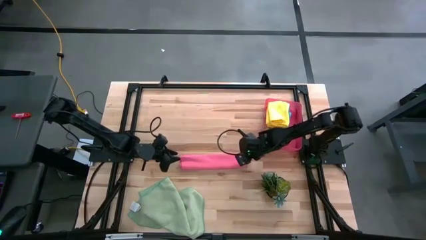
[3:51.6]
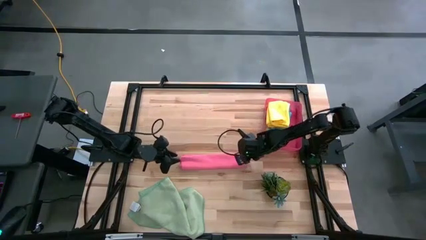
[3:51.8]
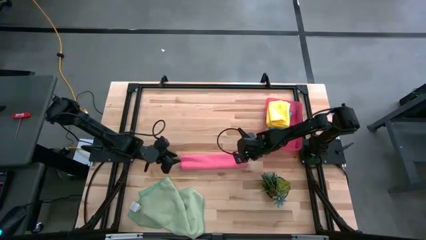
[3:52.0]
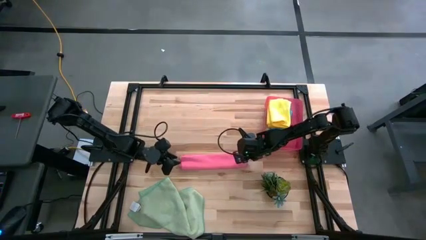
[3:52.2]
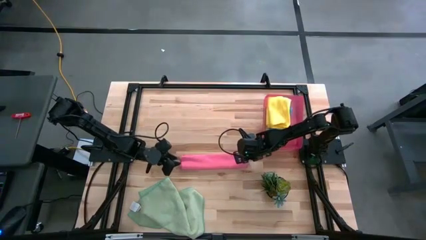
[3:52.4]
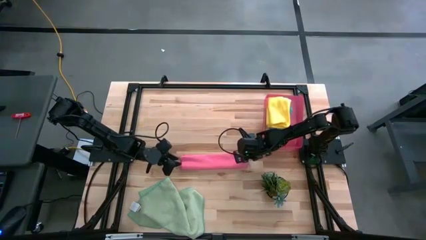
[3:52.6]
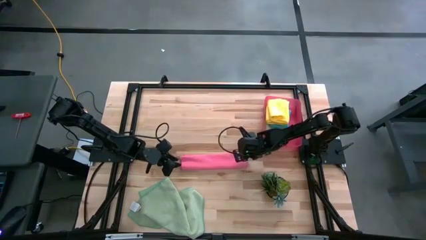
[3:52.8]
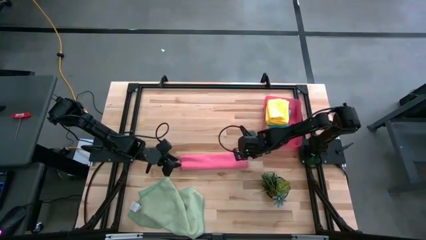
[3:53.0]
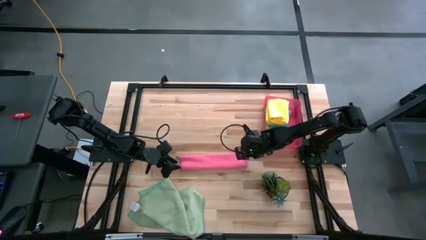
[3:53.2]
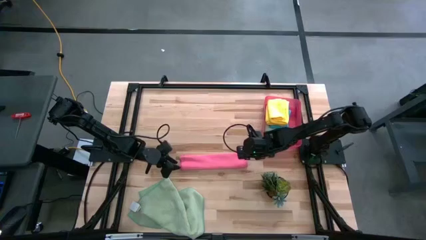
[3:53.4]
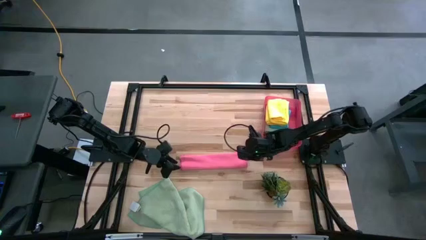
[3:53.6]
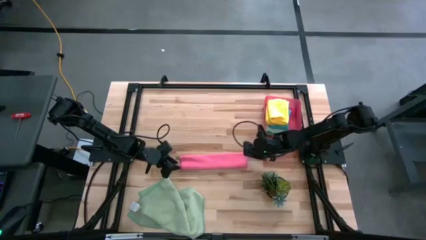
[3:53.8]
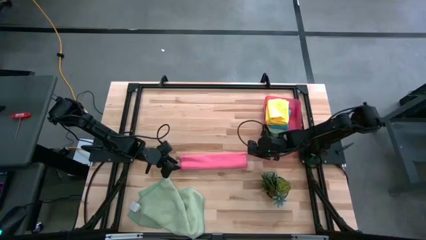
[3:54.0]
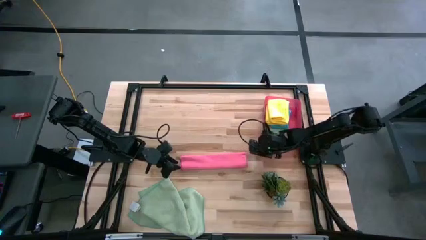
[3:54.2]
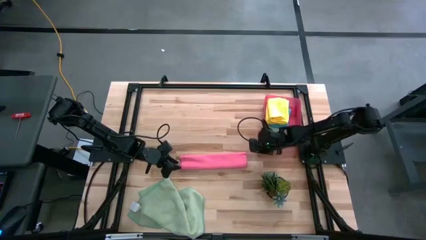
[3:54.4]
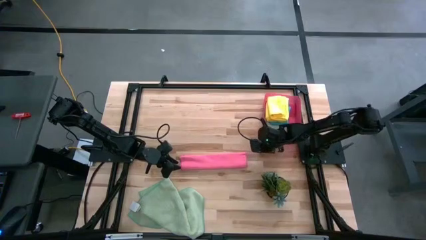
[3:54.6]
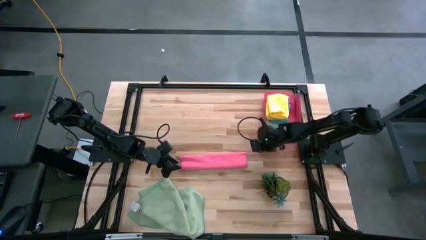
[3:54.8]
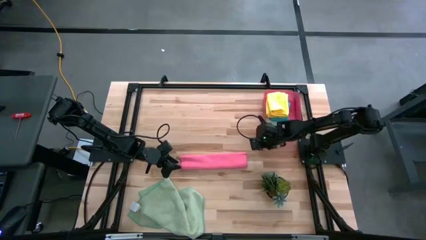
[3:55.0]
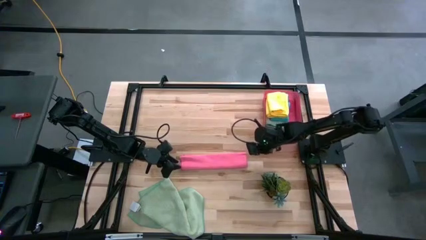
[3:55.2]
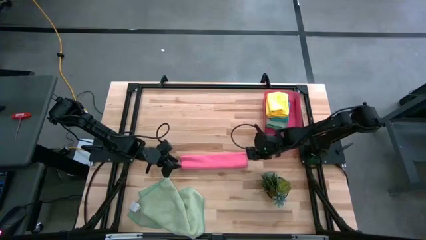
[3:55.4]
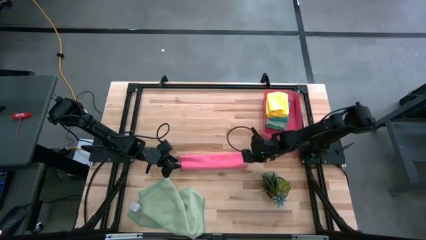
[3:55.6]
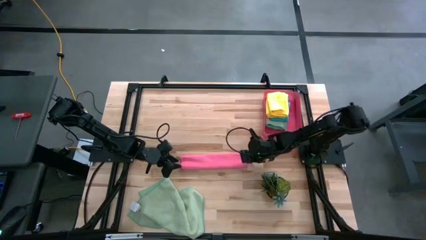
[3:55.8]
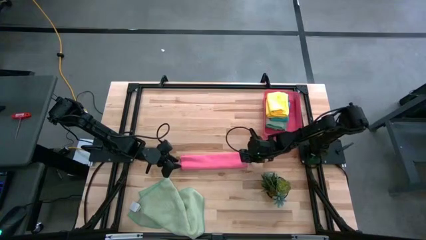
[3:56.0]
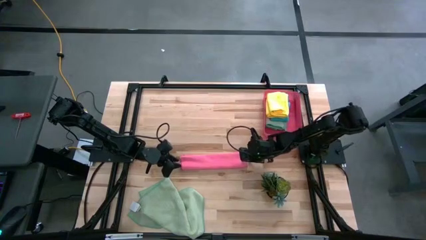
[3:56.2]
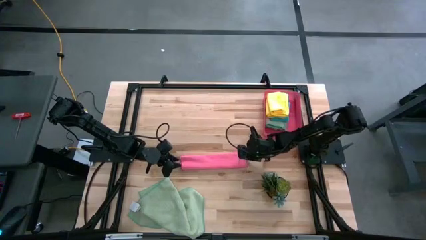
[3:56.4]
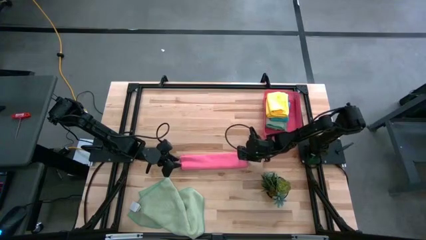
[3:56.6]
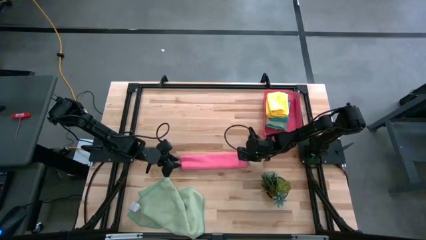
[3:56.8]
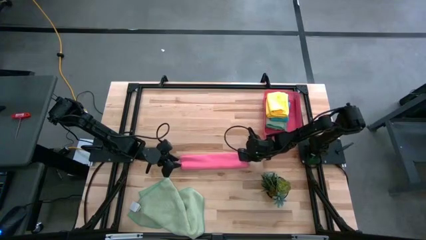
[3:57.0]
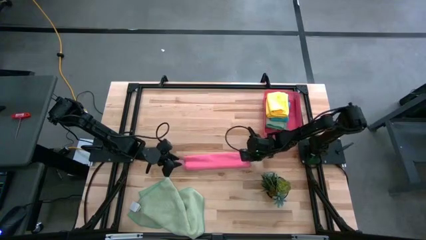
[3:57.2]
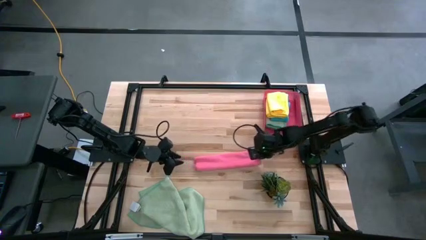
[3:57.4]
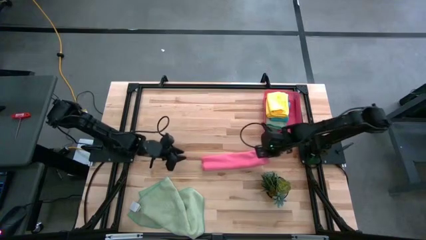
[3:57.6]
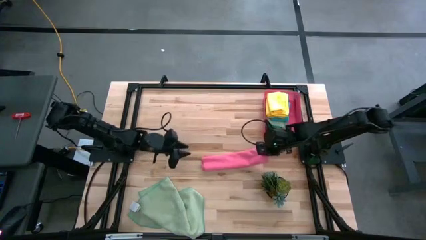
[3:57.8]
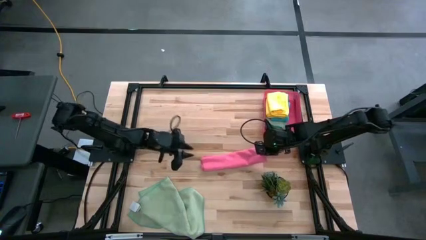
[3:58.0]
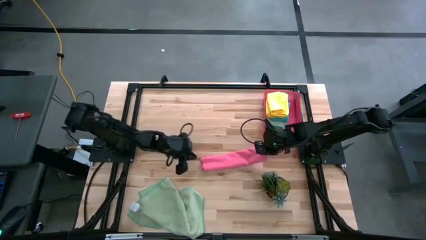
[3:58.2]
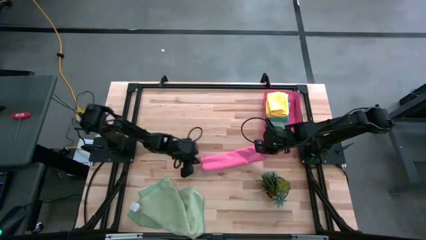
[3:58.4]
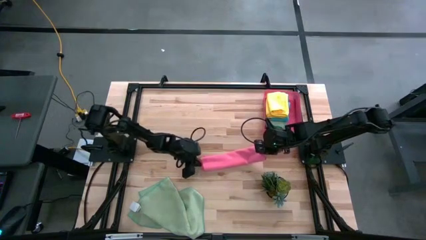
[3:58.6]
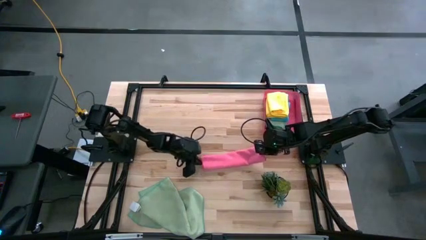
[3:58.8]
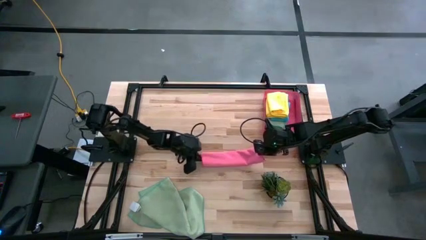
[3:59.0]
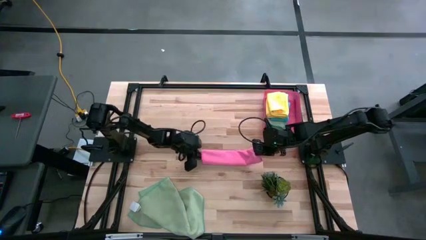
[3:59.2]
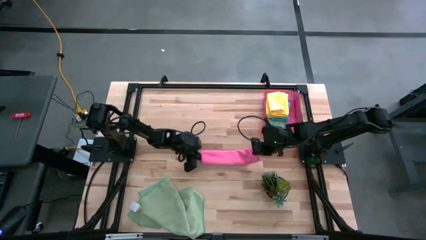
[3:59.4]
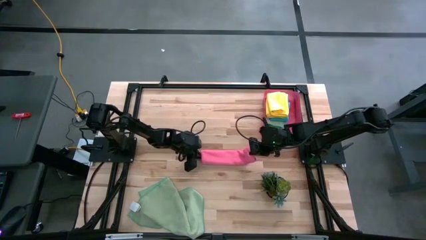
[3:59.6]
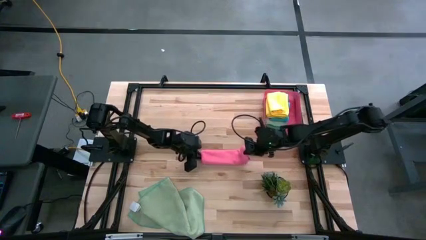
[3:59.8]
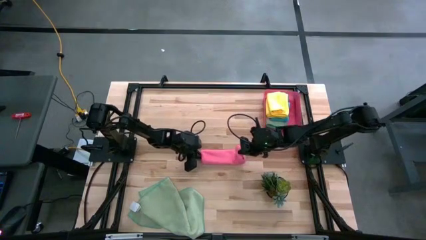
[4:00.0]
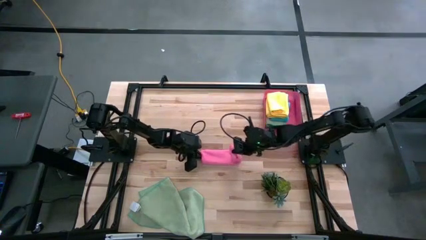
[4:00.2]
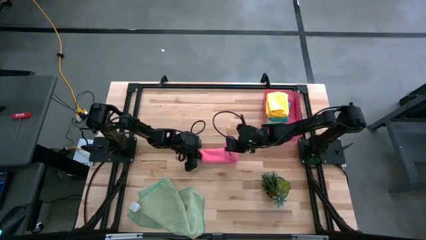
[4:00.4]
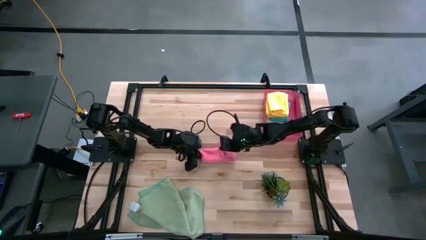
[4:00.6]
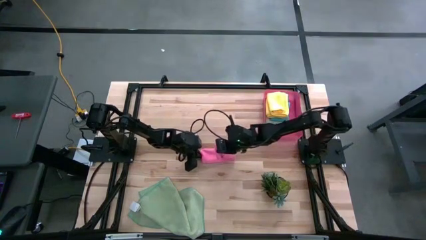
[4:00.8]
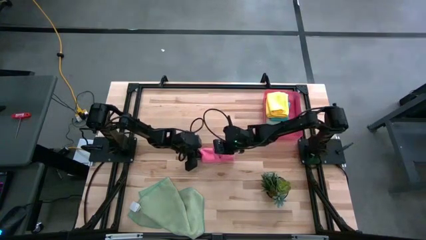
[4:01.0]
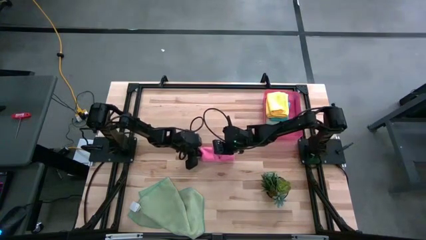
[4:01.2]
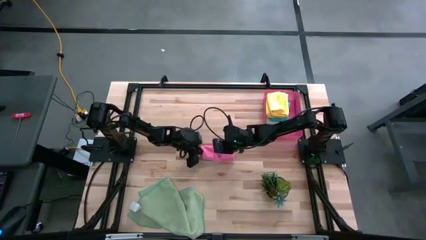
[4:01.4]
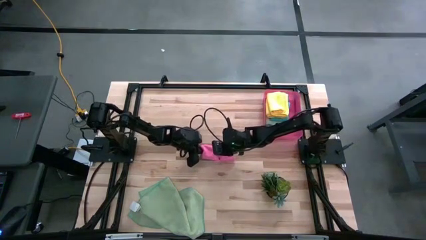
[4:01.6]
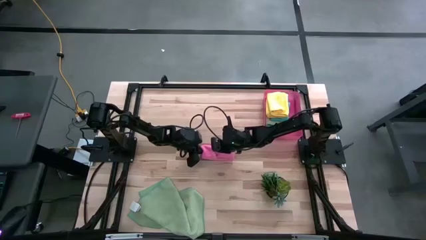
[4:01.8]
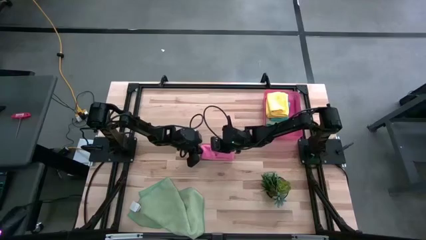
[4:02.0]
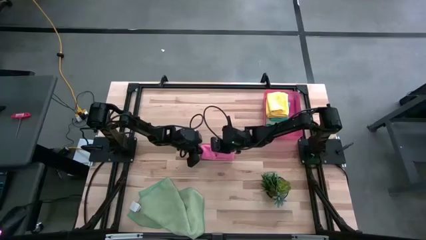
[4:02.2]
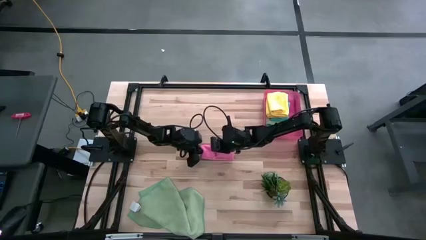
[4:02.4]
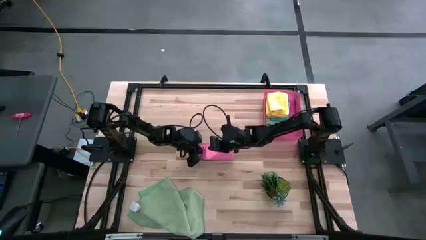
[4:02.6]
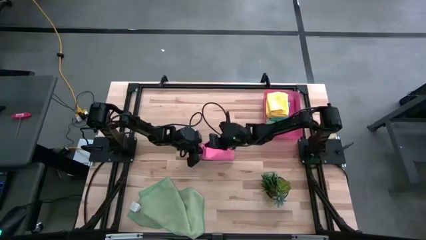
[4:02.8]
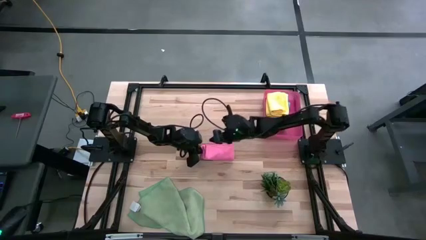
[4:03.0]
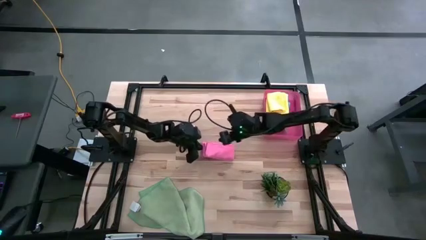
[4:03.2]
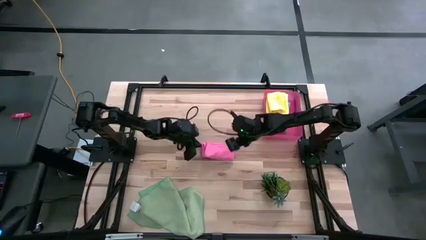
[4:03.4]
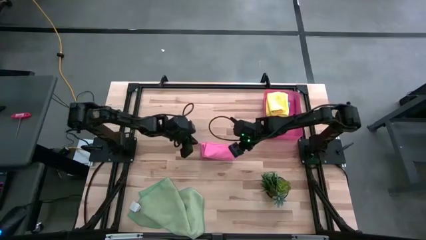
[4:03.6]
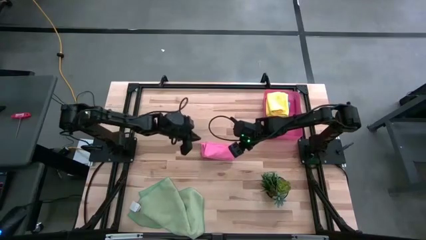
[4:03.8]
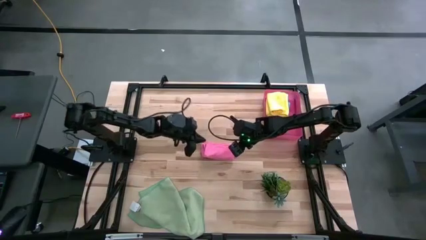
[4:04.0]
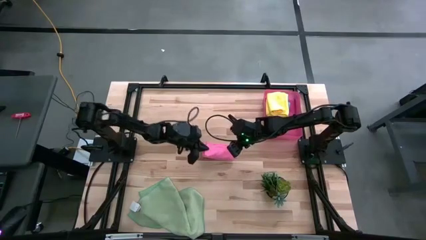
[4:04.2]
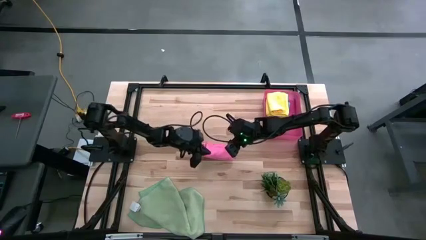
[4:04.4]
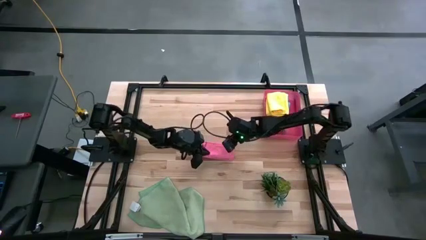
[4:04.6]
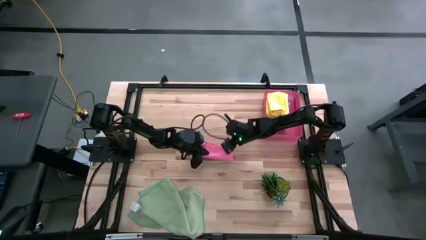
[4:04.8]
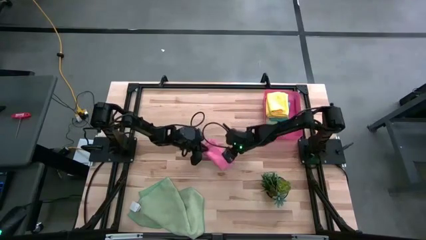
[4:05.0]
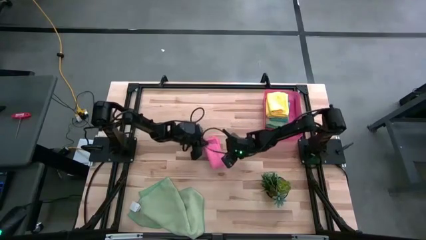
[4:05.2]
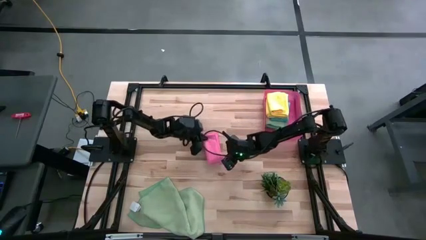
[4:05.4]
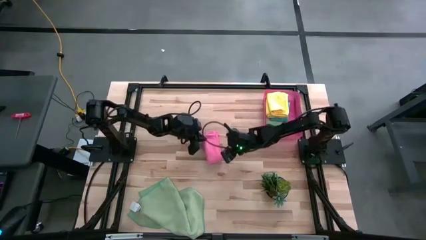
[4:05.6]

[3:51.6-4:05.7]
Task: Fold microfiber towels
Fold the pink microfiber cloth

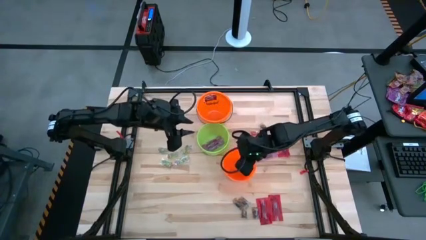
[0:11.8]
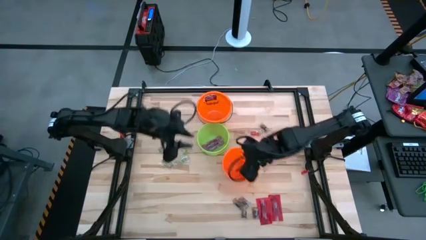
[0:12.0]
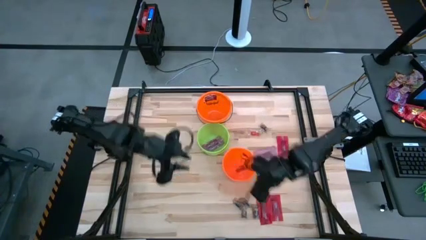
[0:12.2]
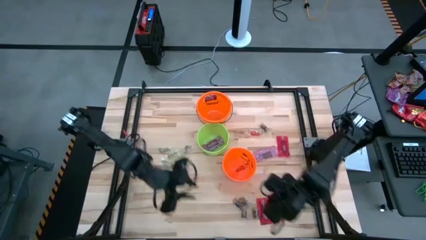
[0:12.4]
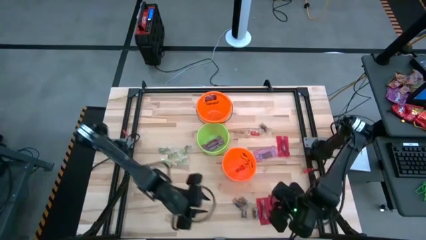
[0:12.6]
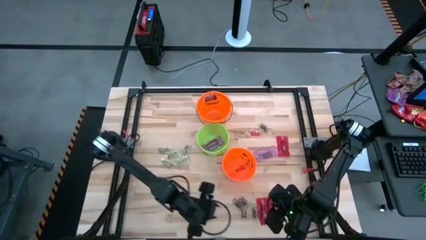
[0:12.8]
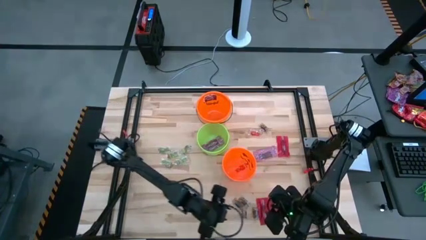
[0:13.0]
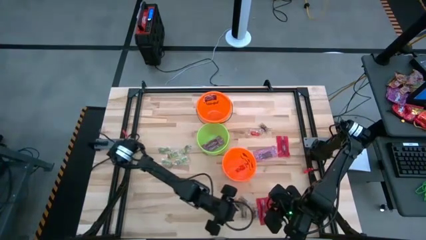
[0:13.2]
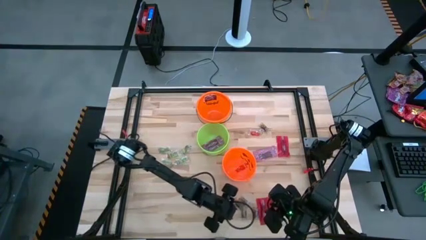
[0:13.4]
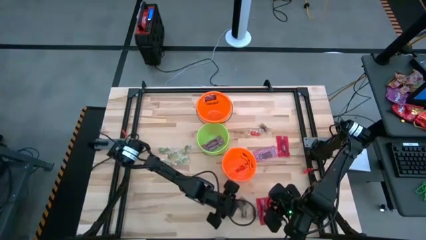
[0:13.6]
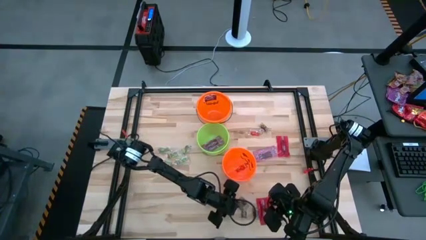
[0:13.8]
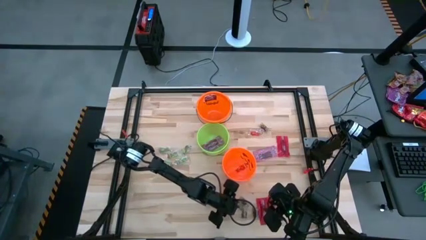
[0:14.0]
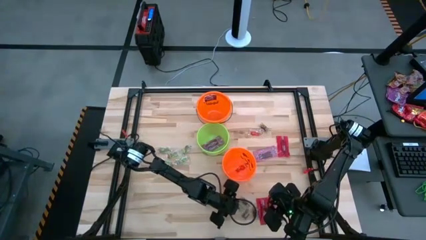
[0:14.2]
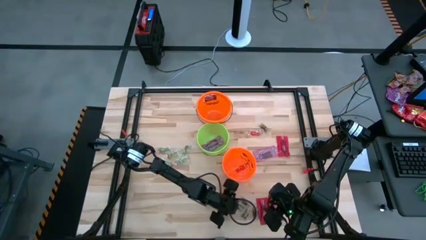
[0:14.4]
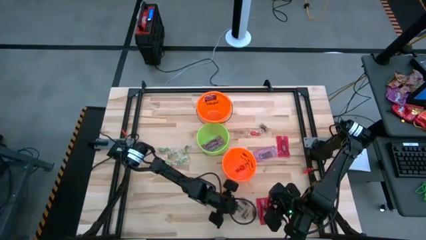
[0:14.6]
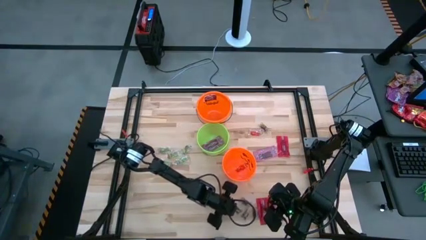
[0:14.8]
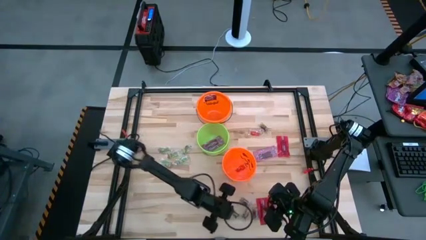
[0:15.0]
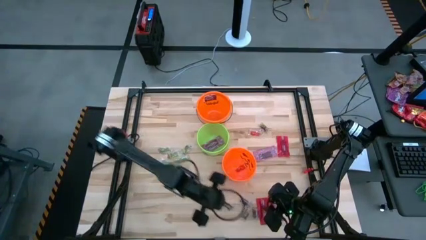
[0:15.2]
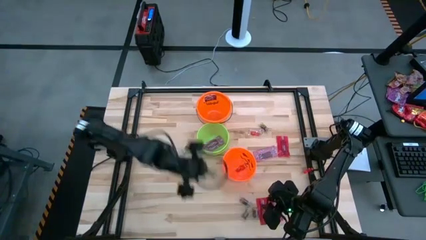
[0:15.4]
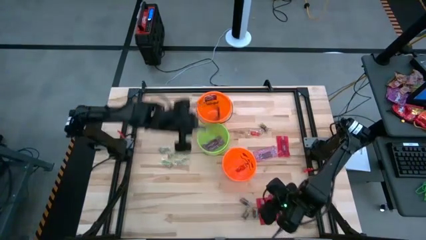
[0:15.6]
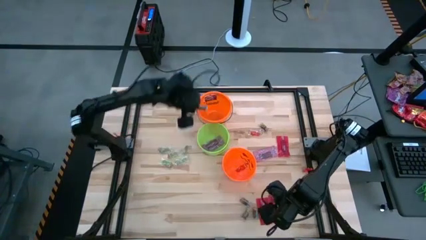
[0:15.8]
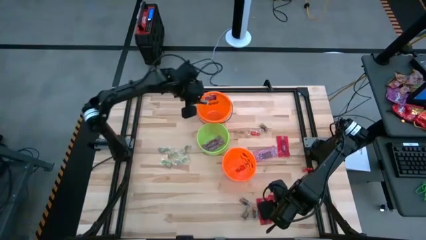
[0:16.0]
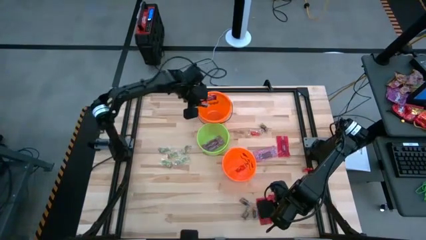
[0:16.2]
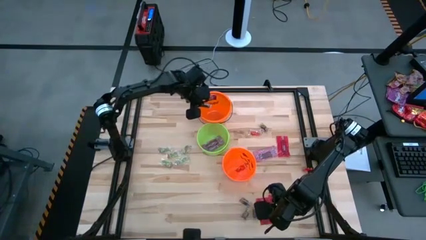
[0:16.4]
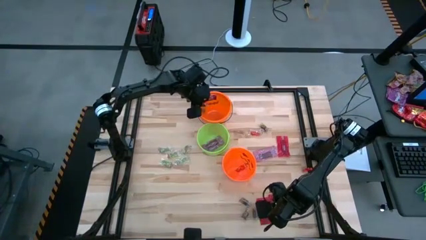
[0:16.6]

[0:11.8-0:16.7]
Task: Sort candy by brand, put in halloween buckets
Put the black gummy into the top orange bucket
